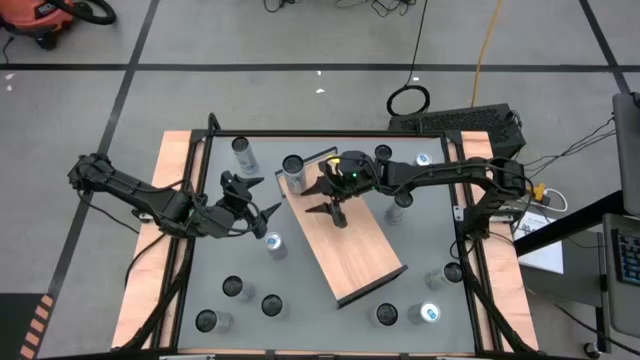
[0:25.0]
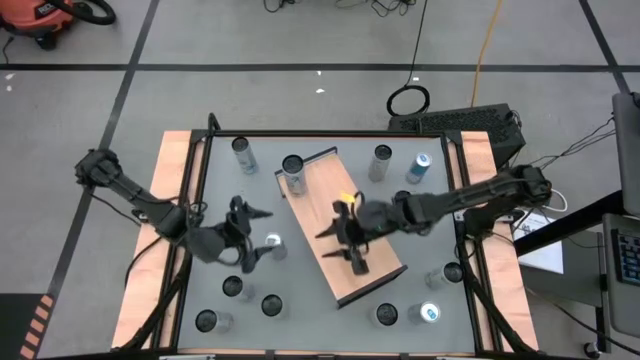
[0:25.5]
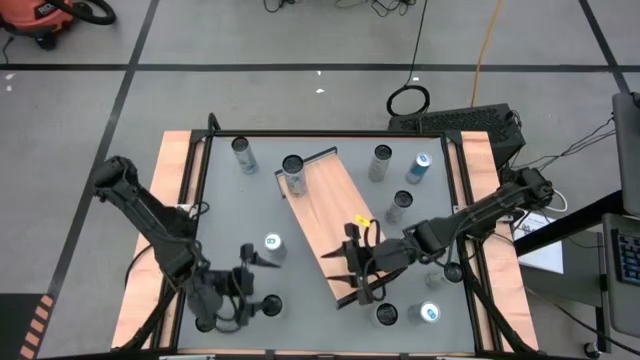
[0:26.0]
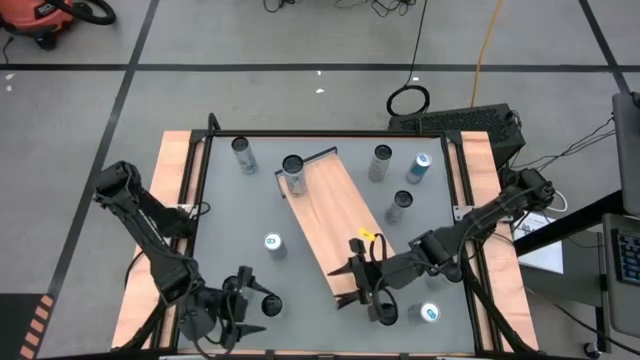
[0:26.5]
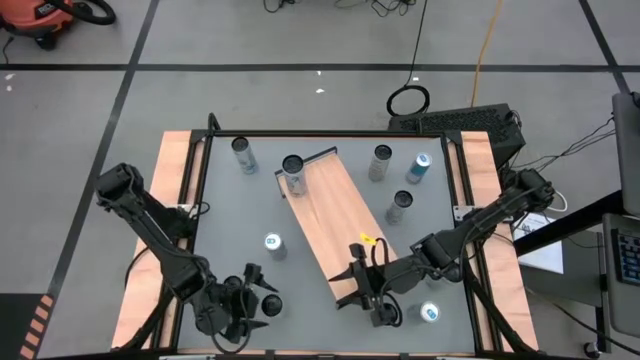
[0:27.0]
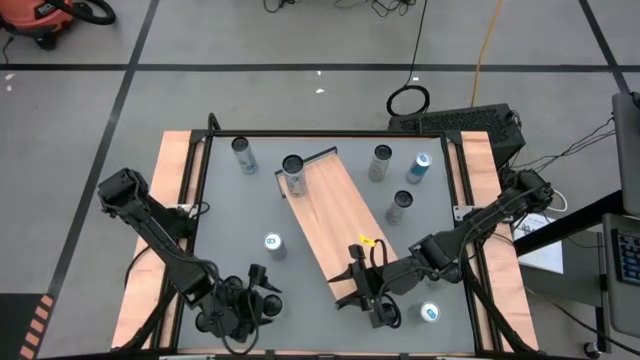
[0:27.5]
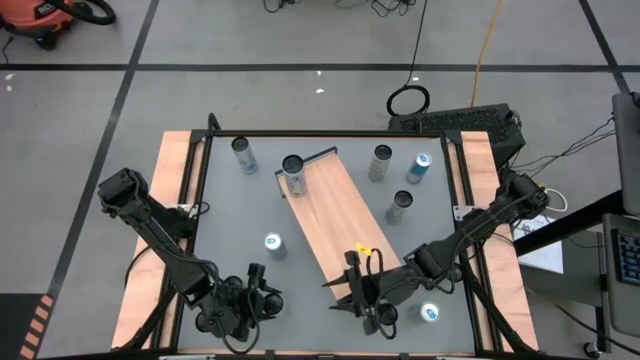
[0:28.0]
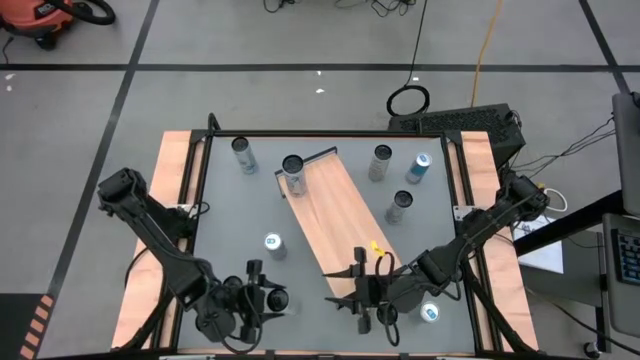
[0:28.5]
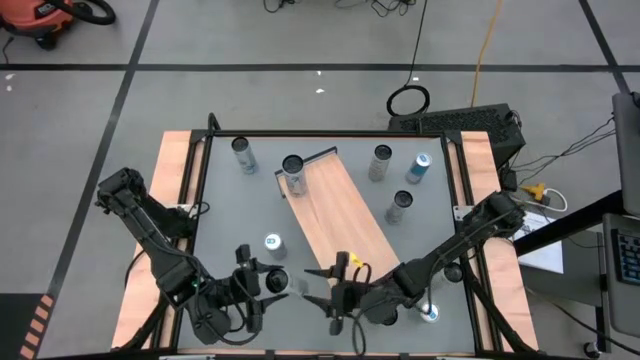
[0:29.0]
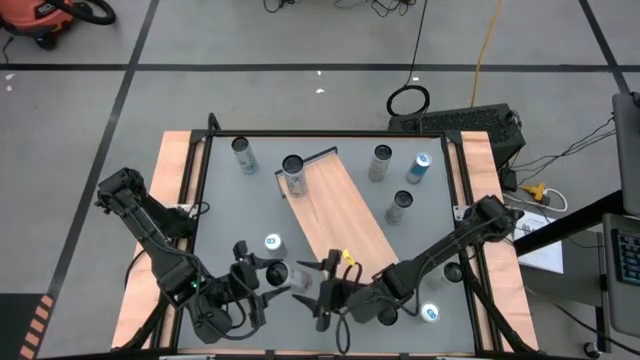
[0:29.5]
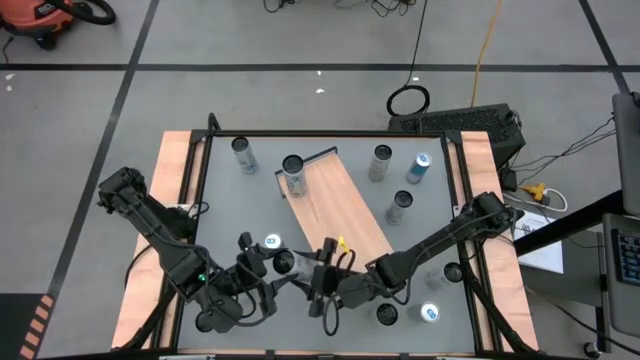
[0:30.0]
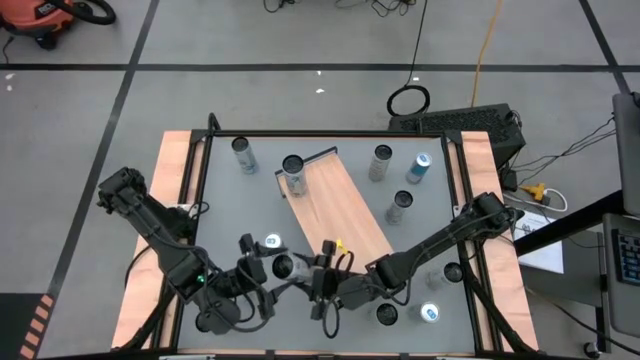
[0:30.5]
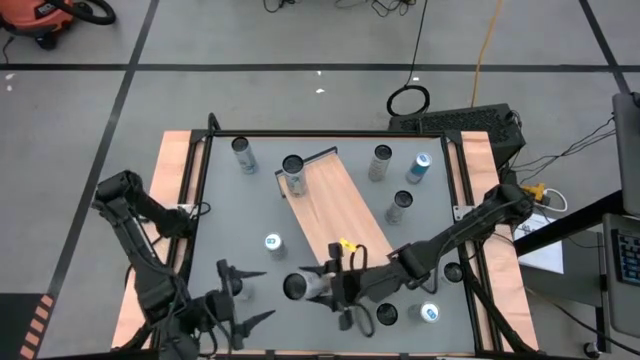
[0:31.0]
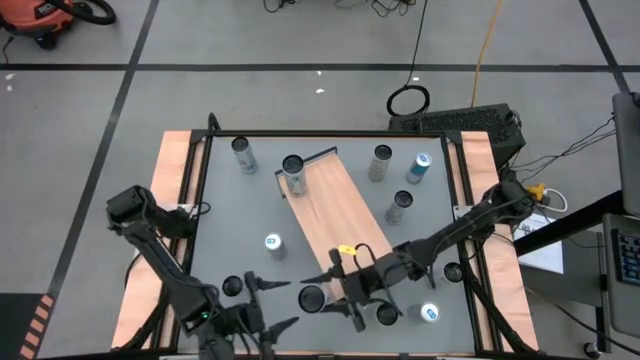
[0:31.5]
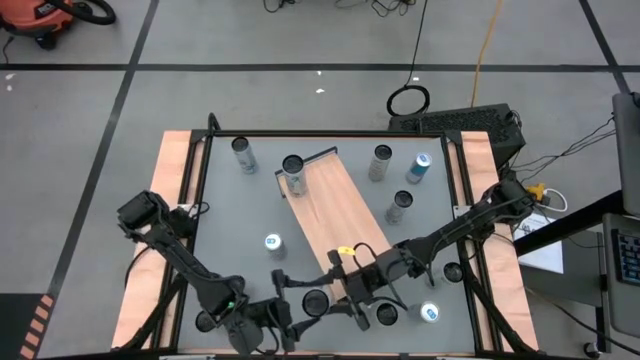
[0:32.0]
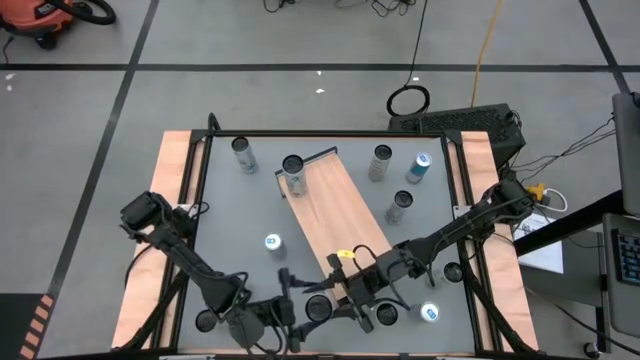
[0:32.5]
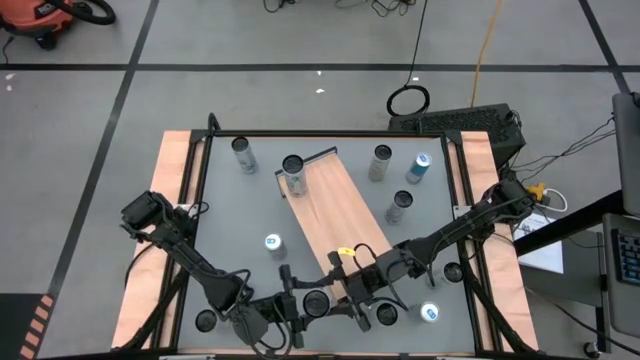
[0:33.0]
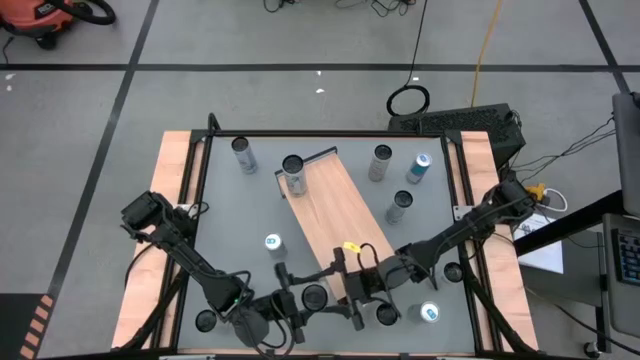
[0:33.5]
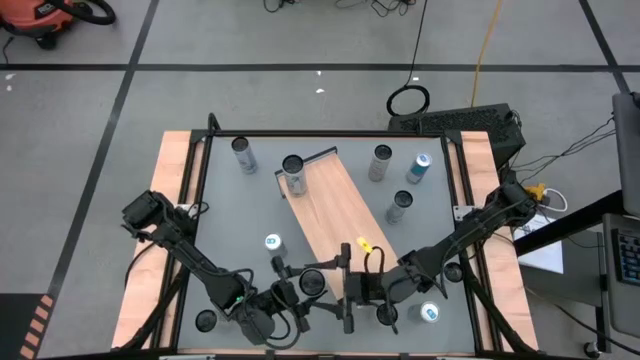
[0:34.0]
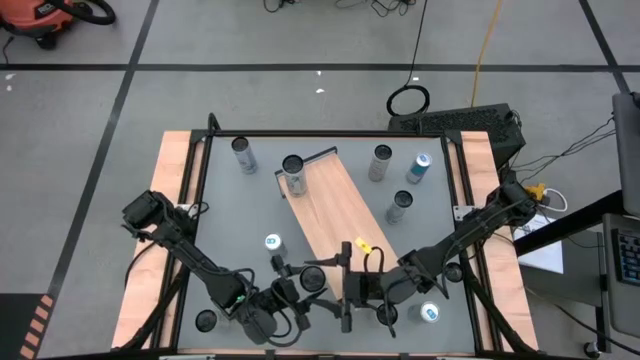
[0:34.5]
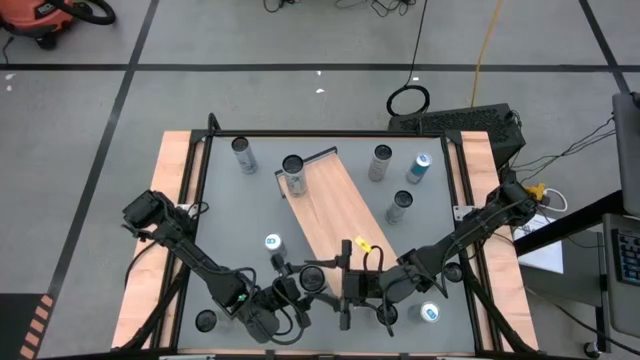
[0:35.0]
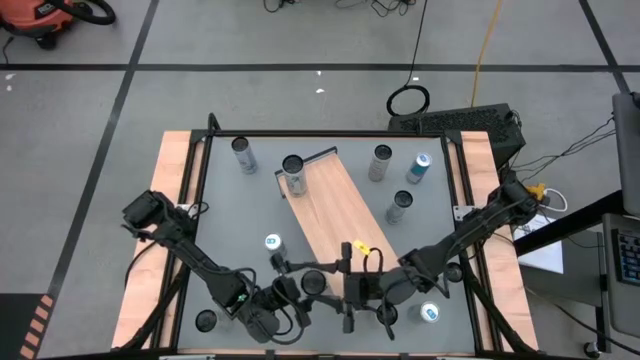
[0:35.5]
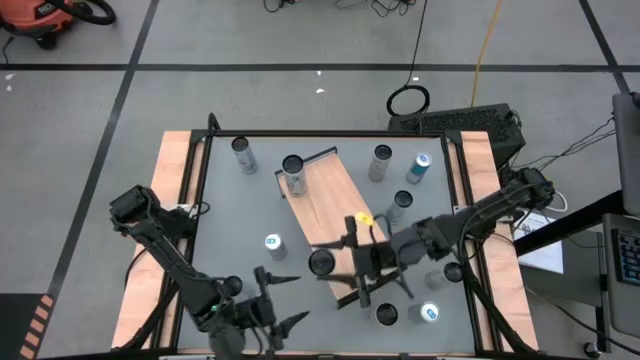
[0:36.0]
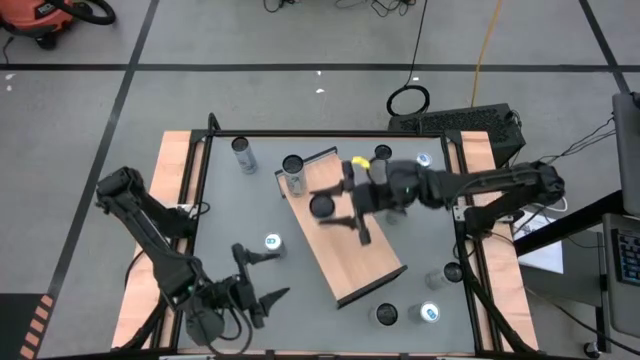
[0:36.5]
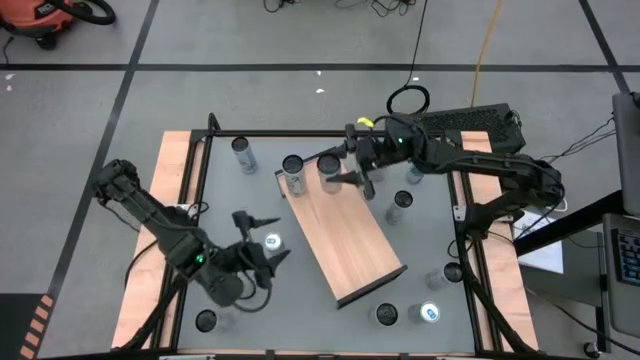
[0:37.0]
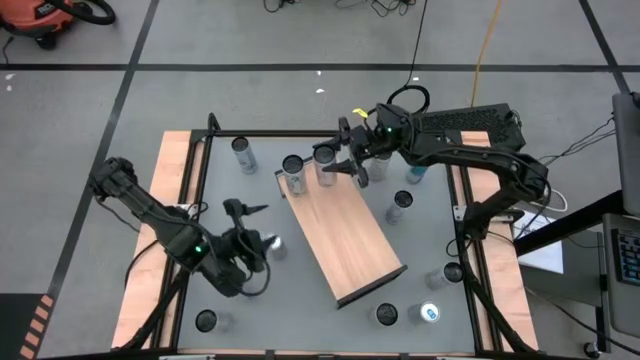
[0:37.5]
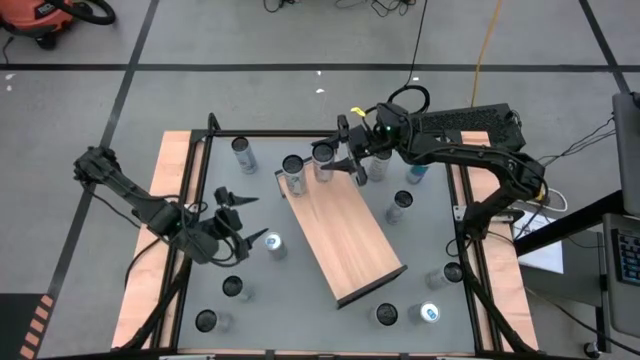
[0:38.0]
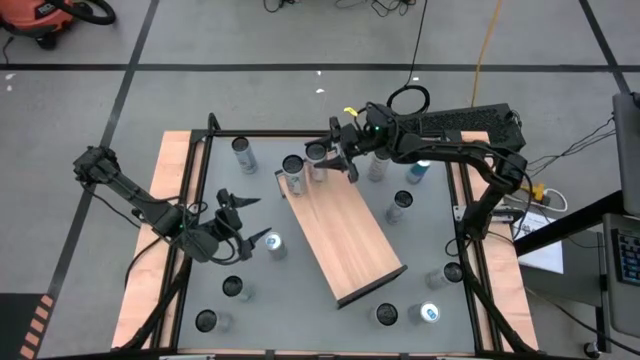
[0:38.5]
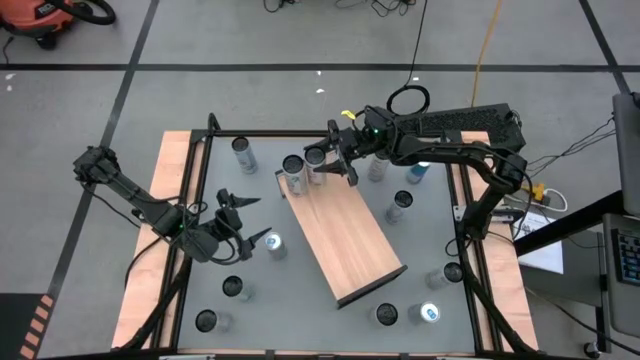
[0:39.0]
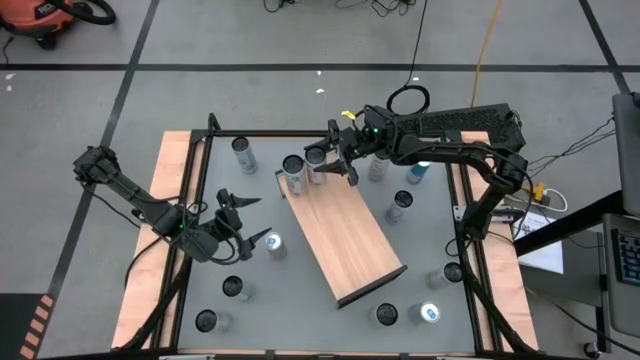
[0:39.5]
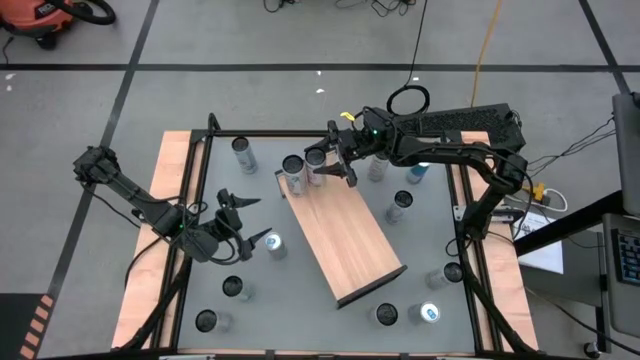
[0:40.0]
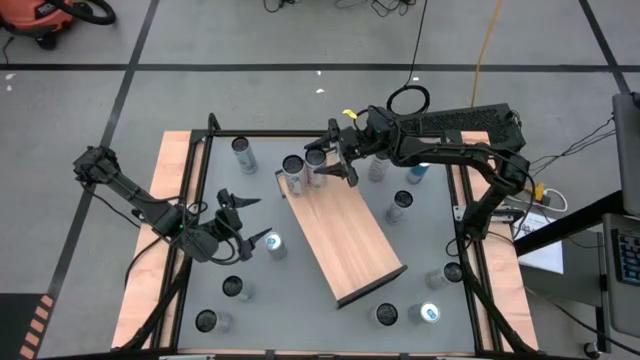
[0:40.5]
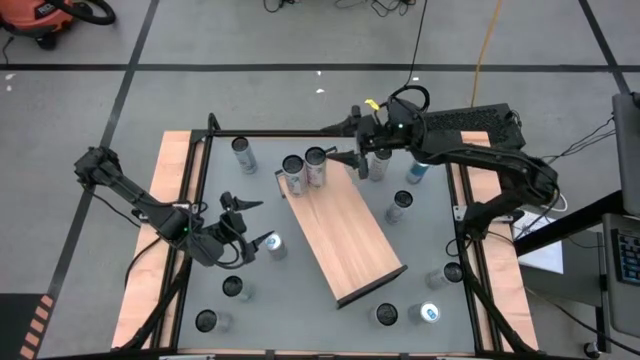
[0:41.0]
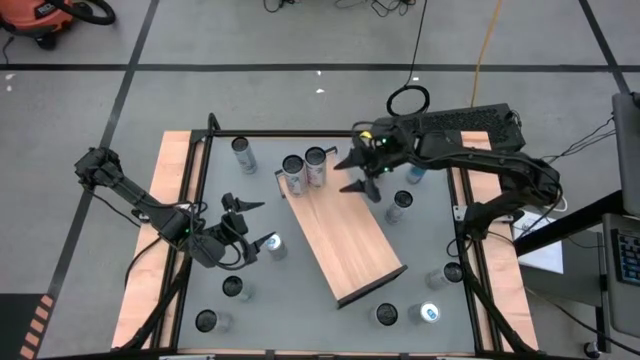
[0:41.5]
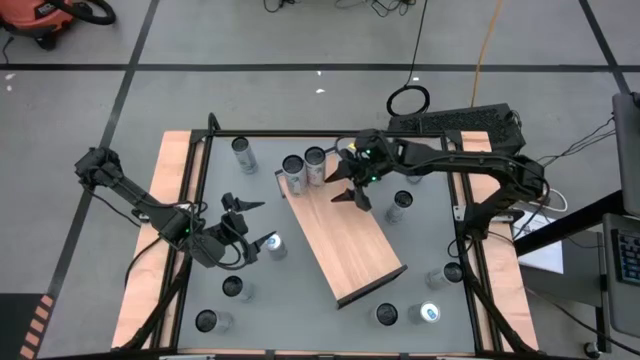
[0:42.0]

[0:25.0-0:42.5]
Task: Place canned beverage on shelf
Put the left white-pink soda can on the shelf aligned with the other white-pink soda can
